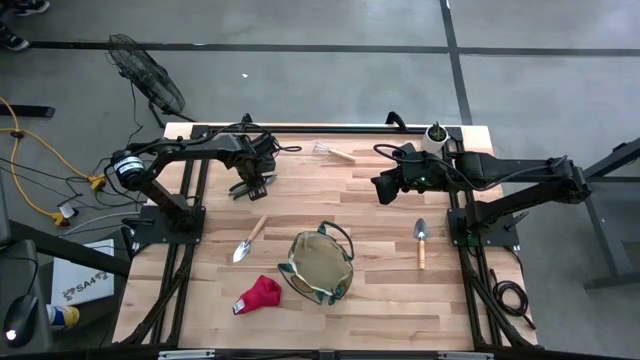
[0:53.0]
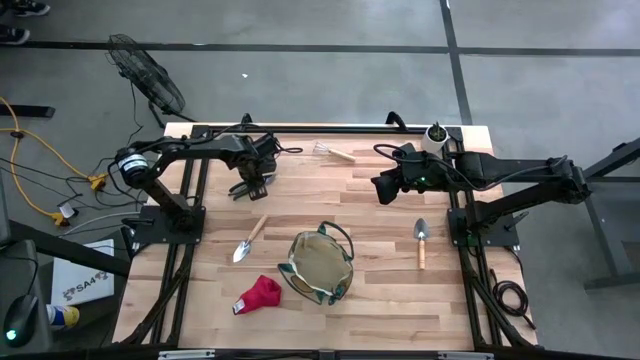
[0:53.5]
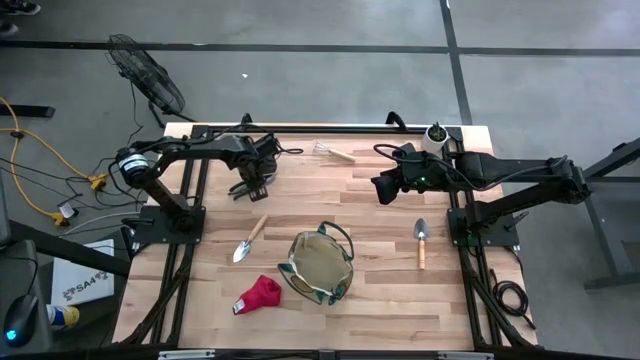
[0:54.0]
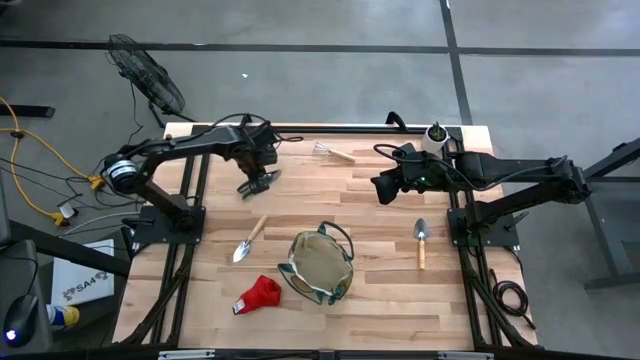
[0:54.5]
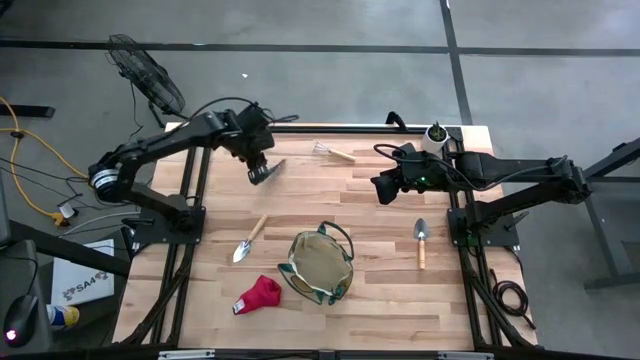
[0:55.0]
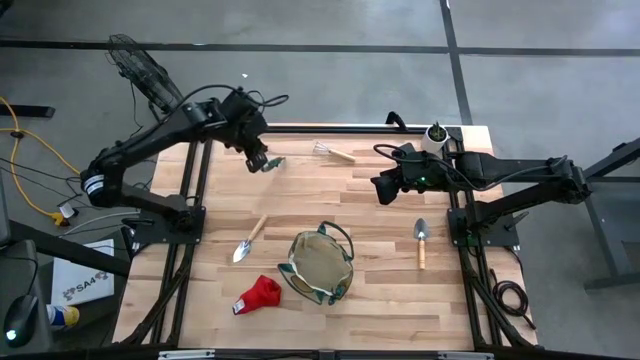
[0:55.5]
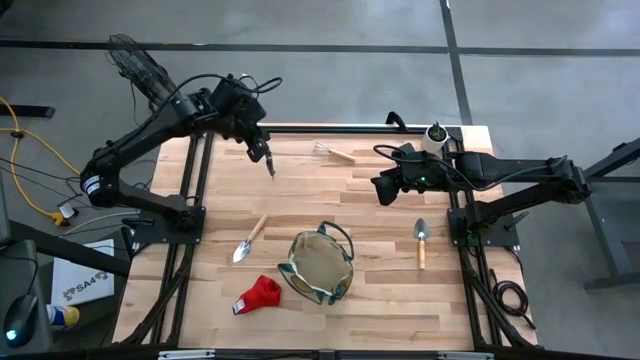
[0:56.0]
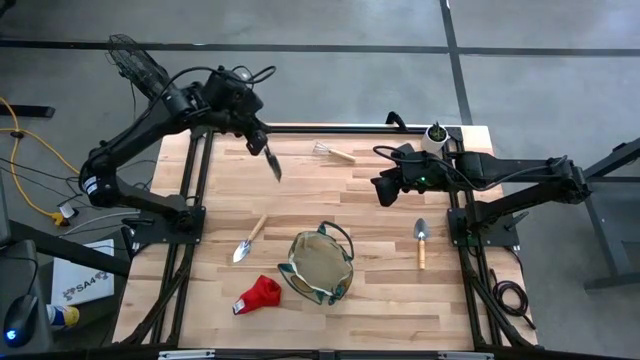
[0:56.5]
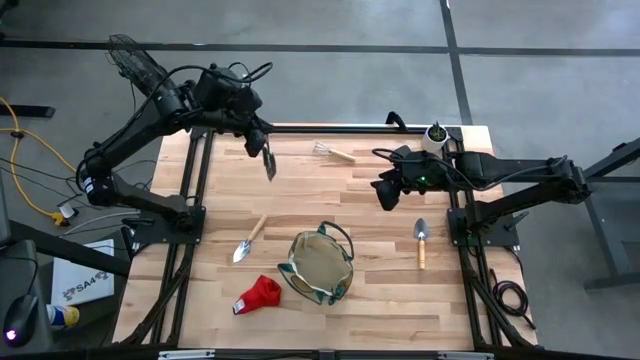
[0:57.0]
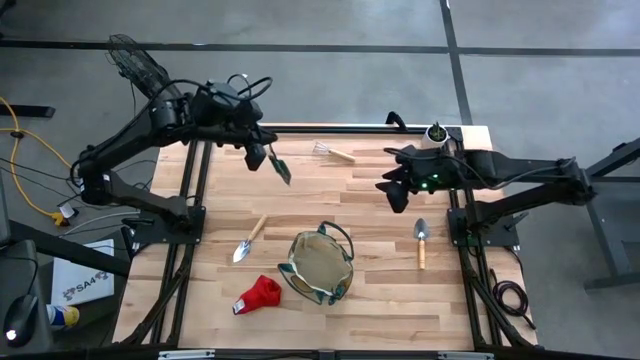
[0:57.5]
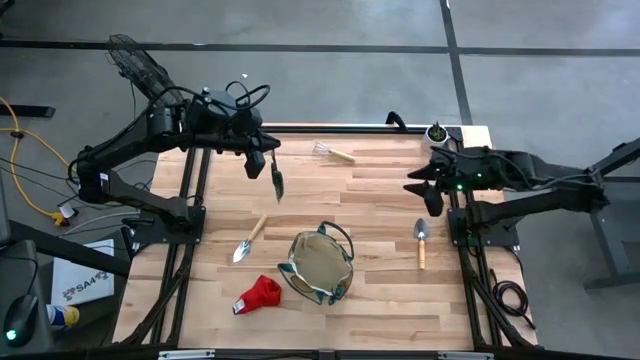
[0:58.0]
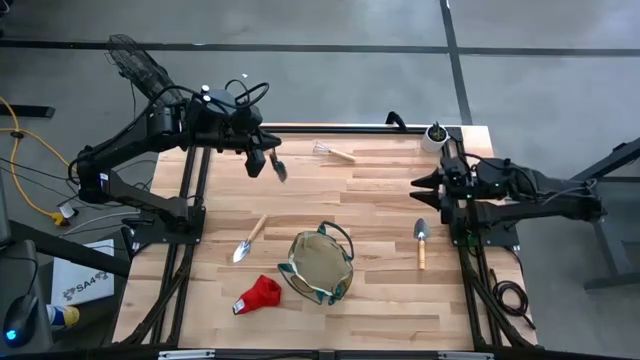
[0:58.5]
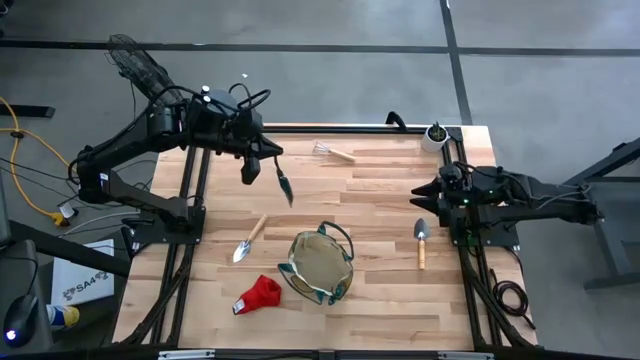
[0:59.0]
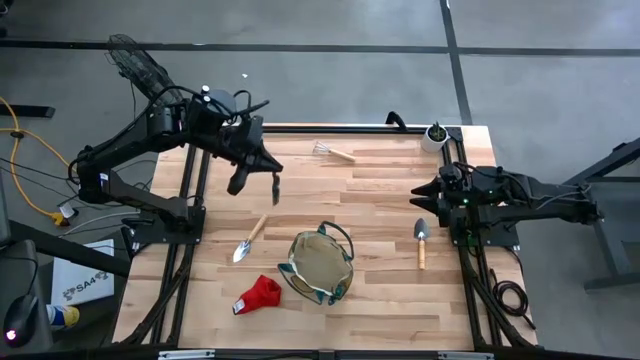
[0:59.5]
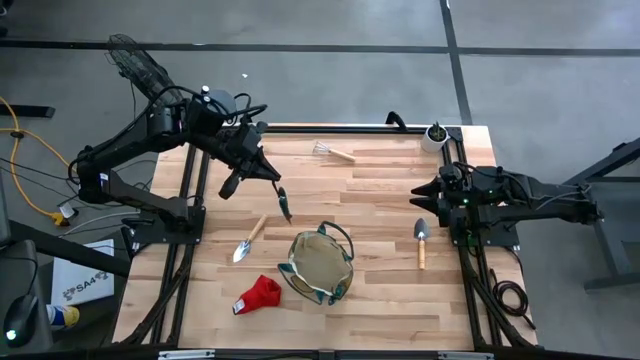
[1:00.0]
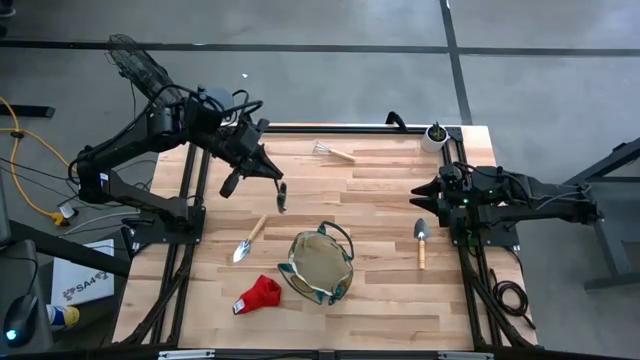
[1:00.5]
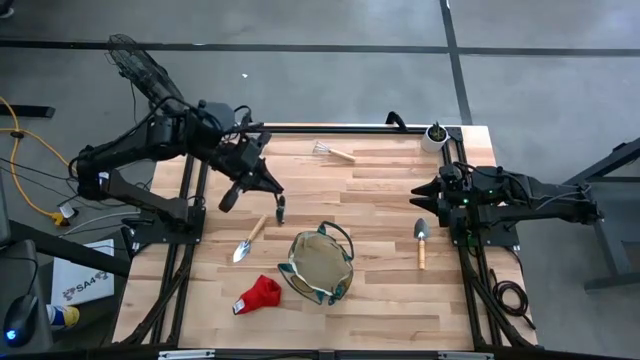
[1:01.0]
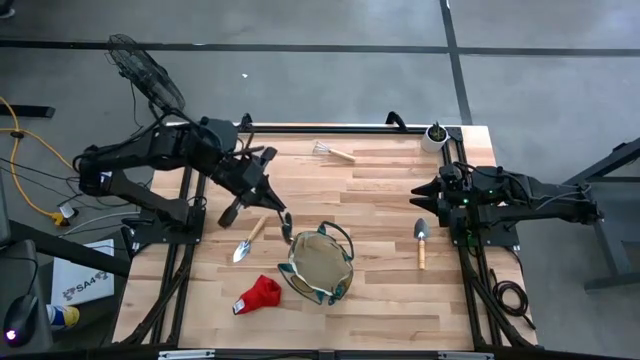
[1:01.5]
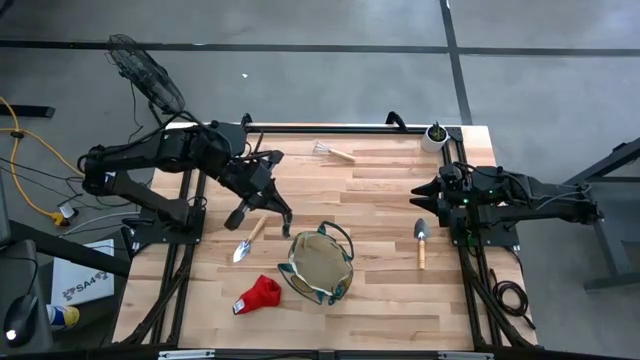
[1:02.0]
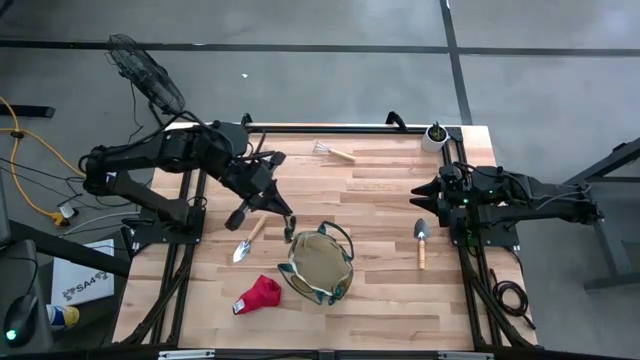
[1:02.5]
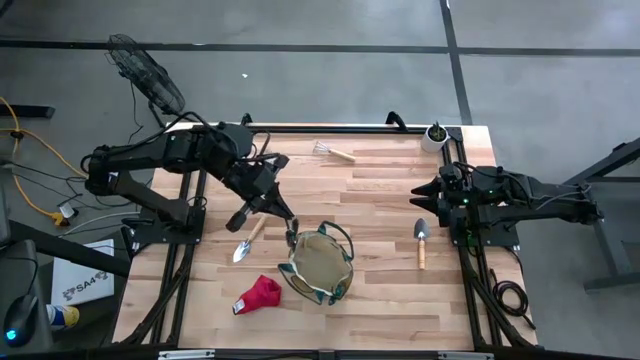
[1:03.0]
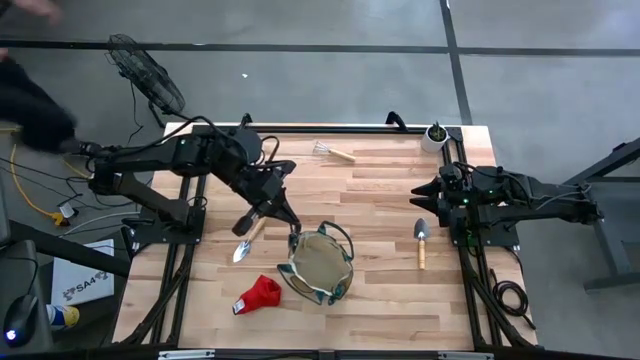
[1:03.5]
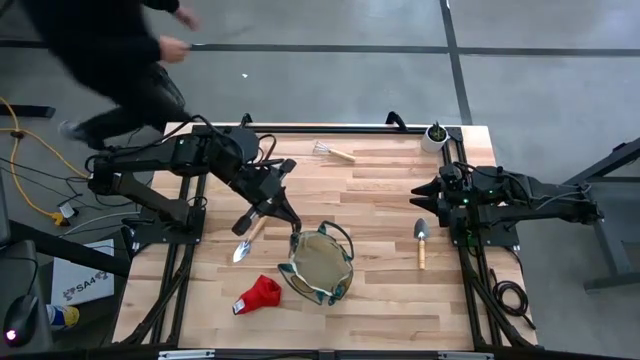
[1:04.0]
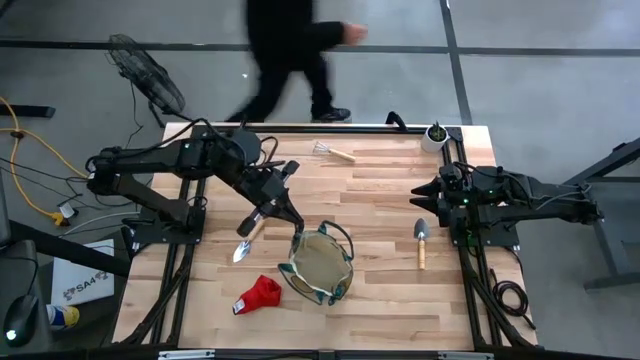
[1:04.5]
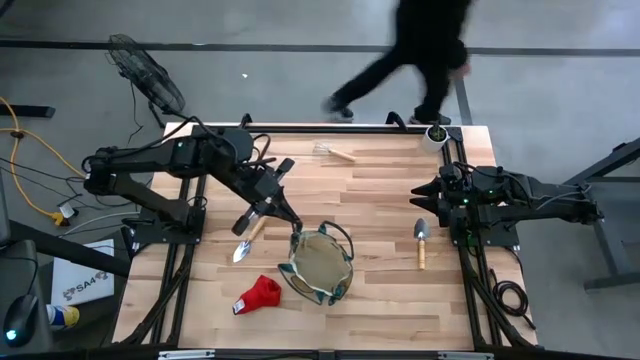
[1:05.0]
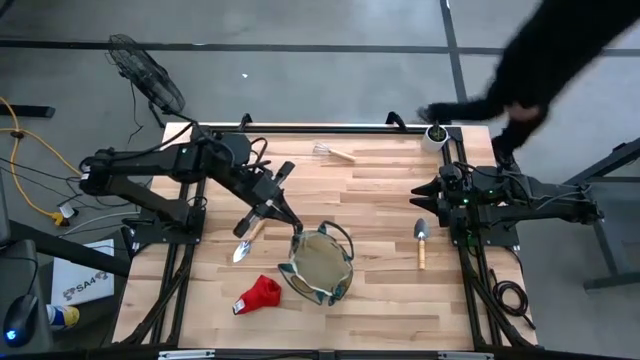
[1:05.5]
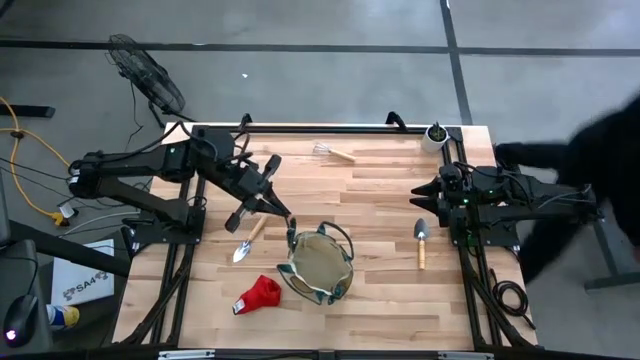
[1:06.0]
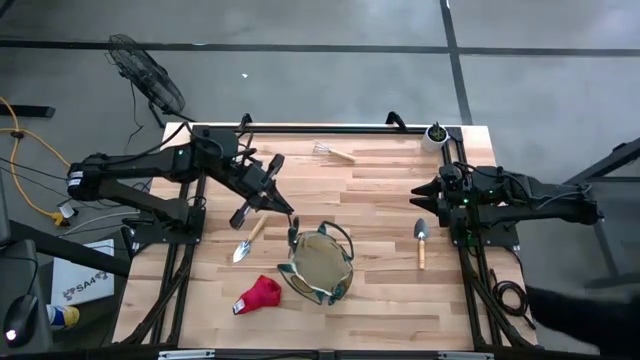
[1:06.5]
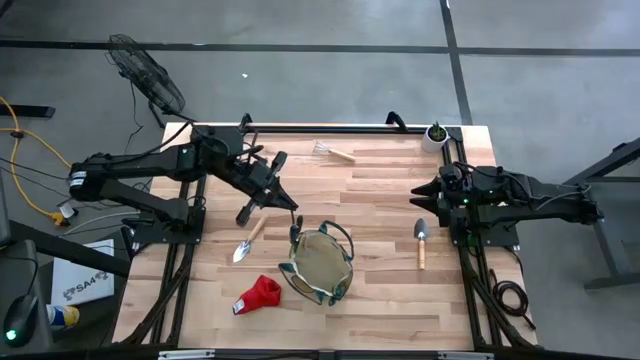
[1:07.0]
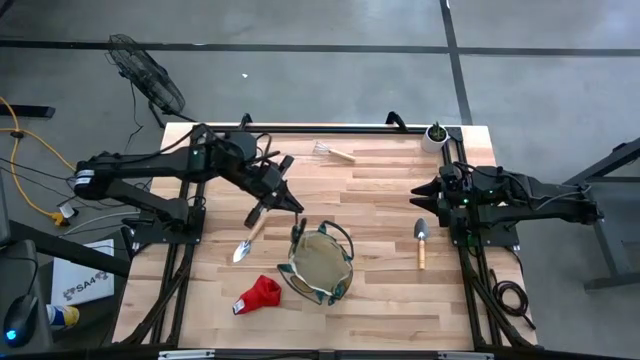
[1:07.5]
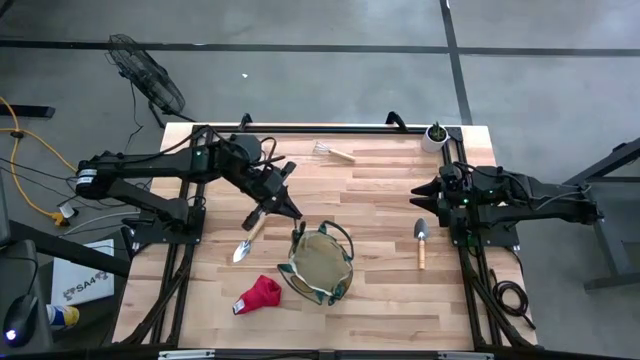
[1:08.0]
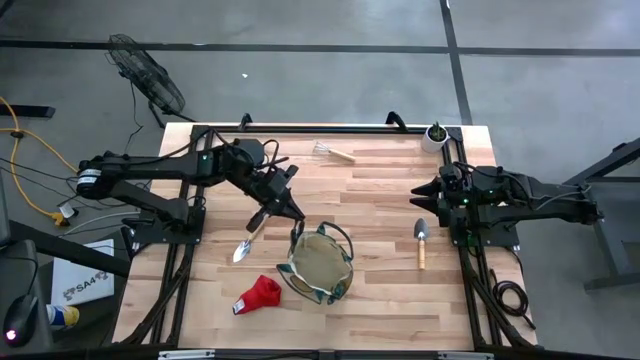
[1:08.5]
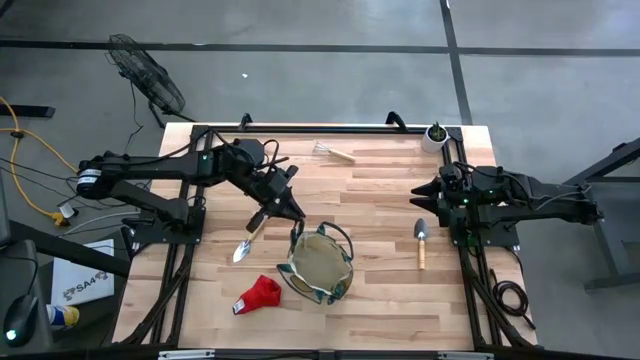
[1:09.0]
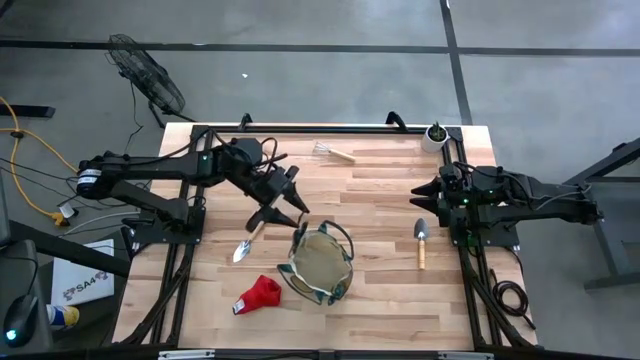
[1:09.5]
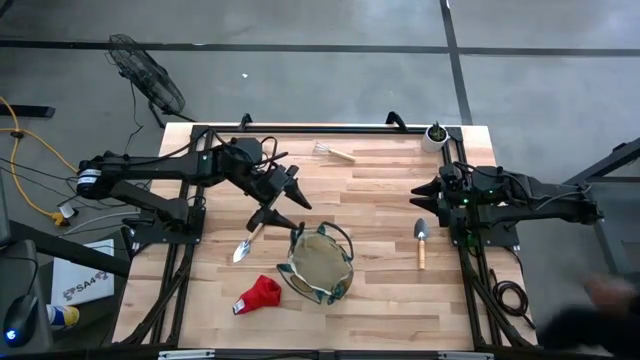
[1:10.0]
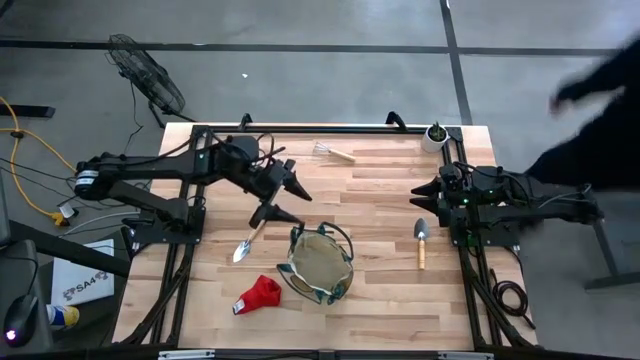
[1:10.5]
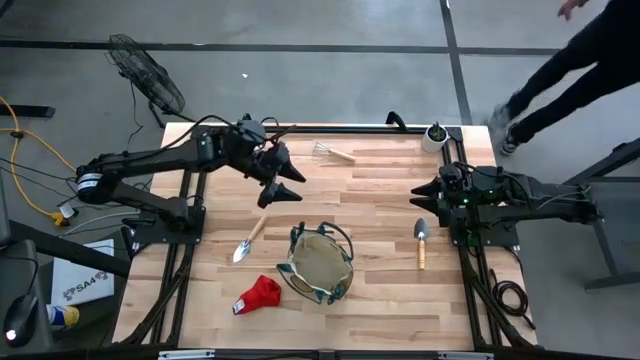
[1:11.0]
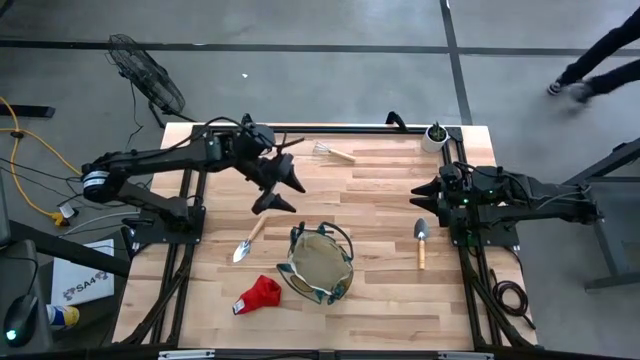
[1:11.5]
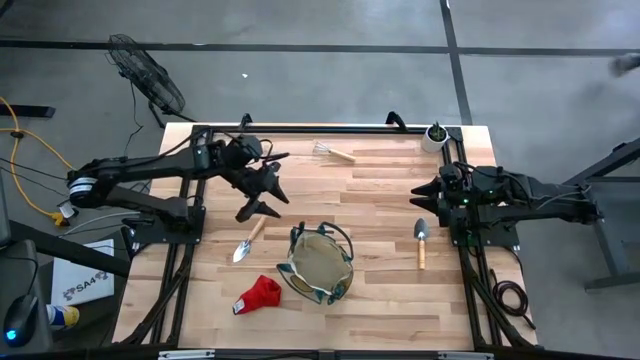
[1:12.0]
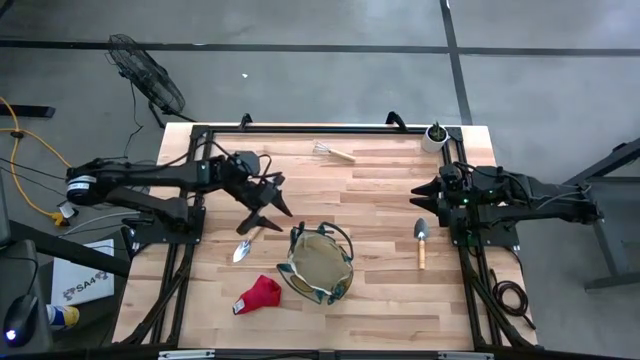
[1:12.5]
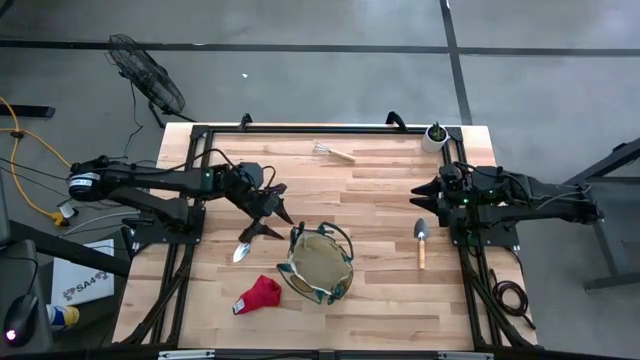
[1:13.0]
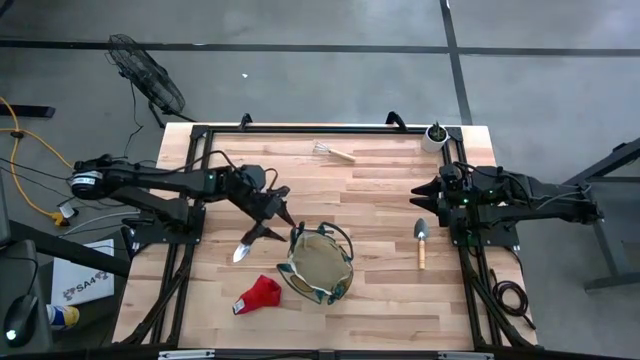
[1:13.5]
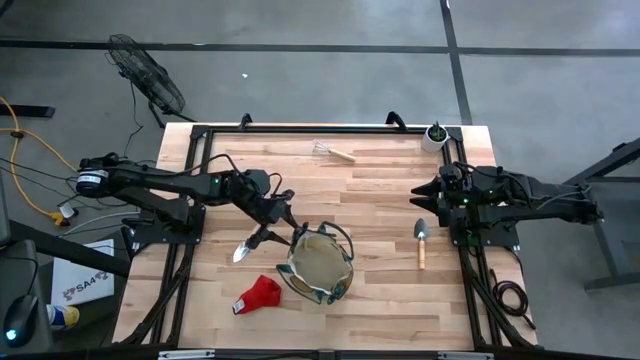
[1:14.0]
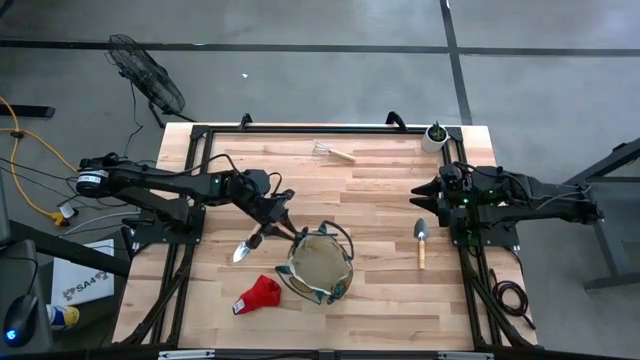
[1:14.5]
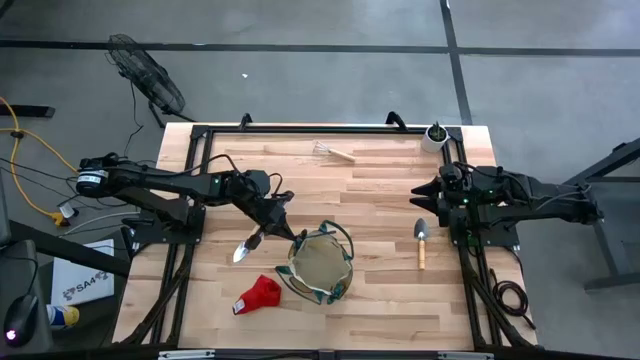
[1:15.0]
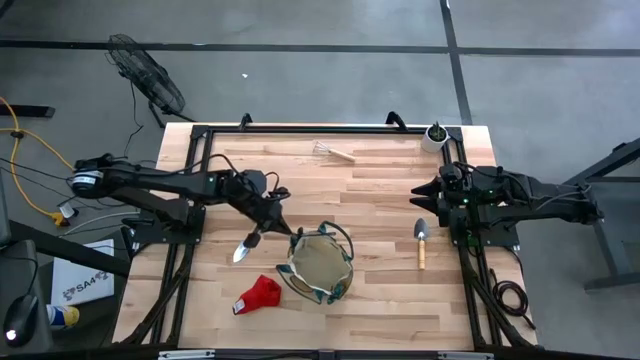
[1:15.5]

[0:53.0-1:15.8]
Task: Pick & Place Garden tools in Gardening bag
Put the green shear scissors into the light brown gardening bag
